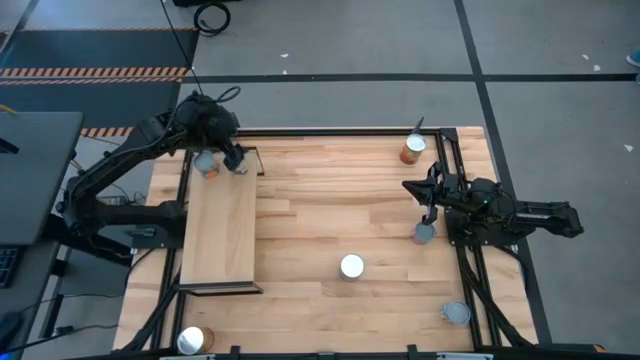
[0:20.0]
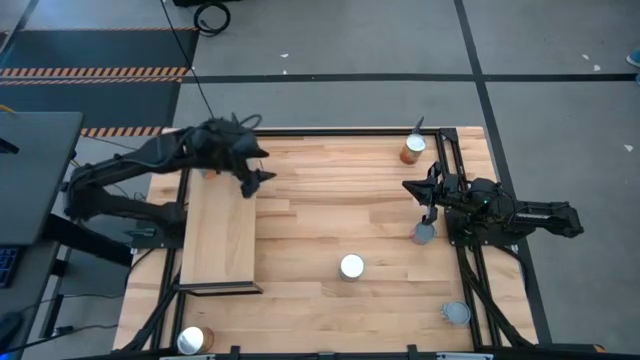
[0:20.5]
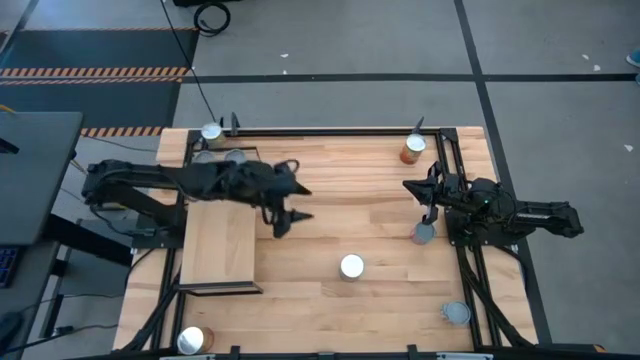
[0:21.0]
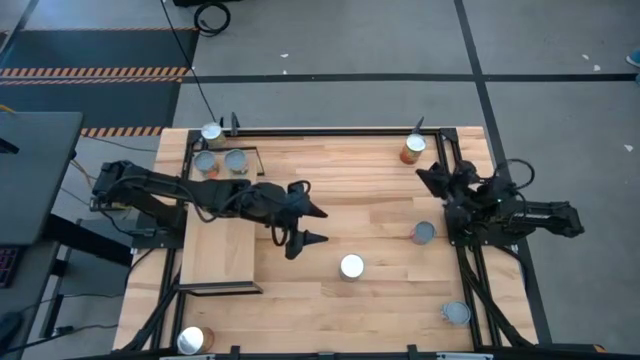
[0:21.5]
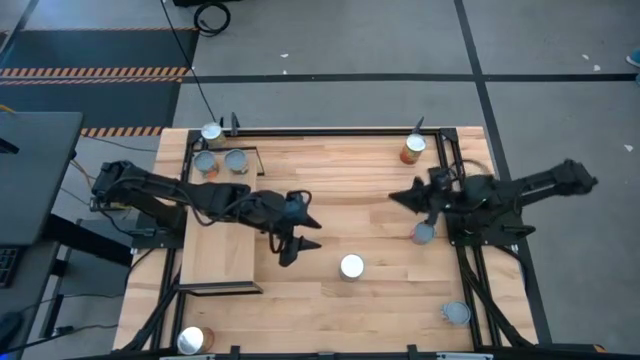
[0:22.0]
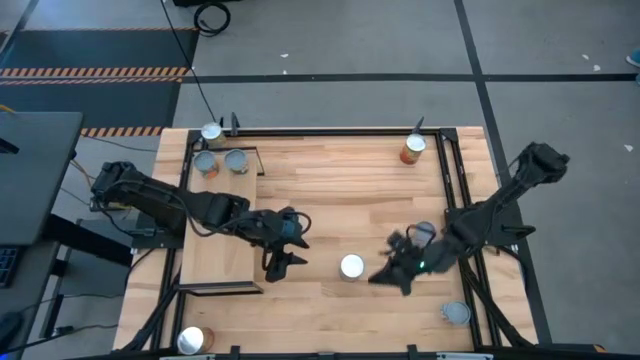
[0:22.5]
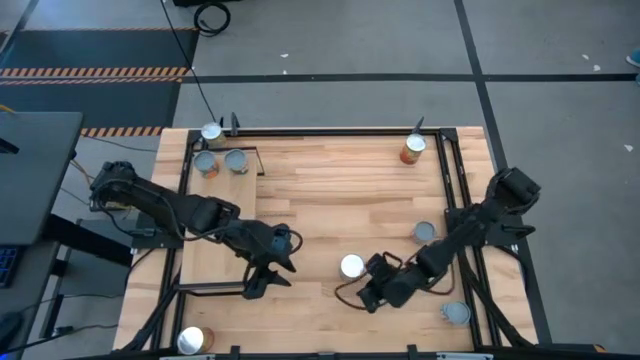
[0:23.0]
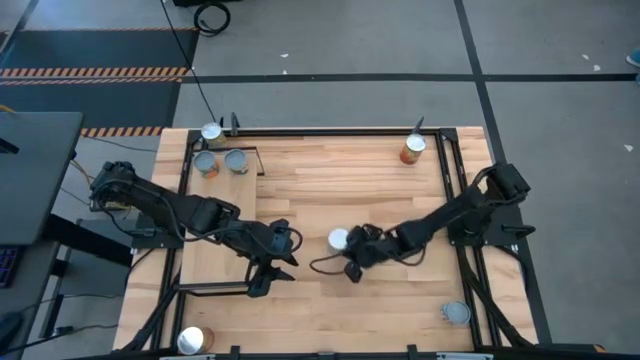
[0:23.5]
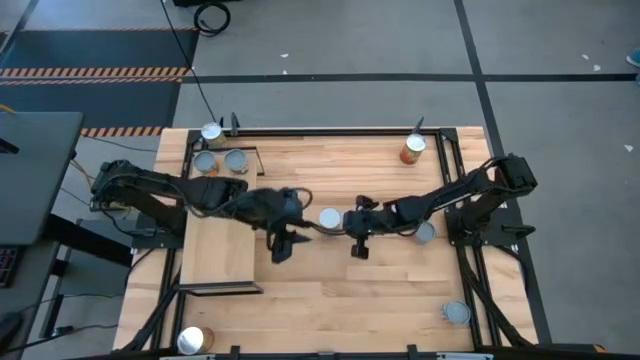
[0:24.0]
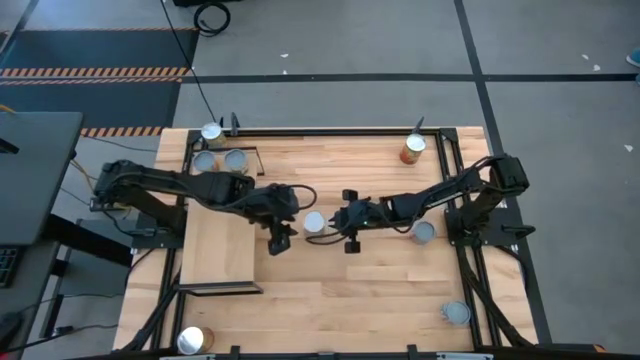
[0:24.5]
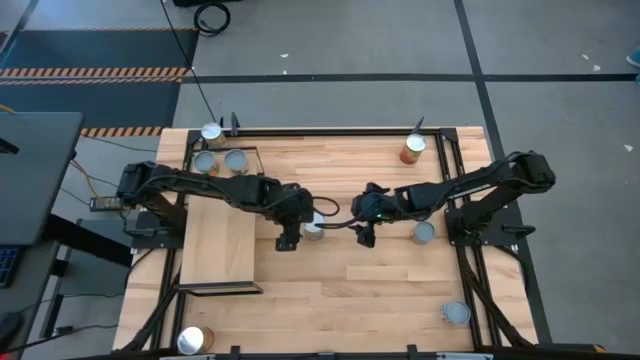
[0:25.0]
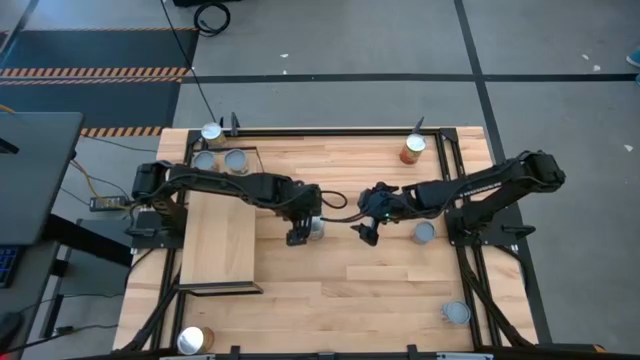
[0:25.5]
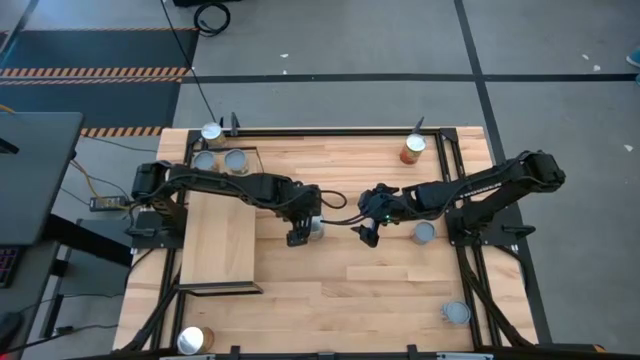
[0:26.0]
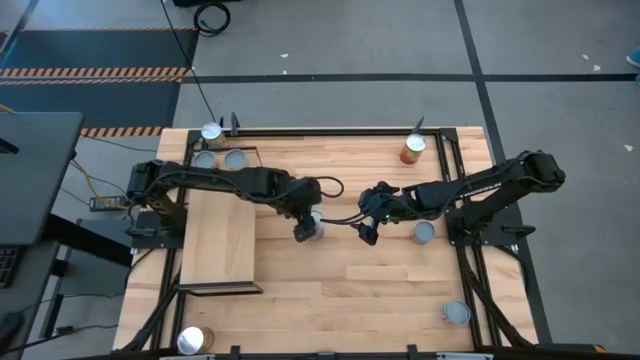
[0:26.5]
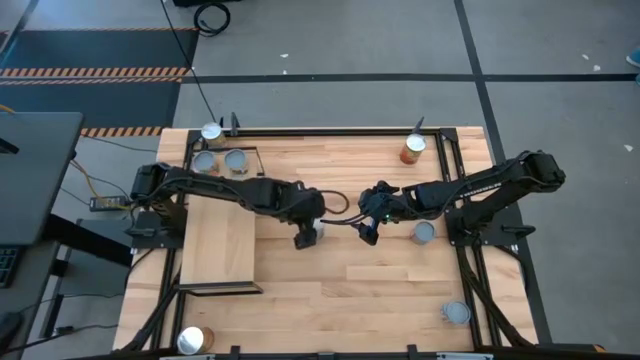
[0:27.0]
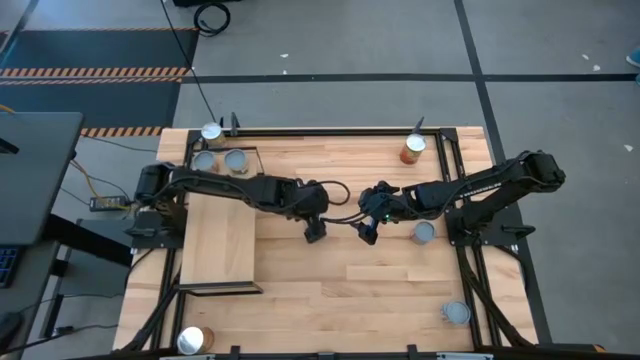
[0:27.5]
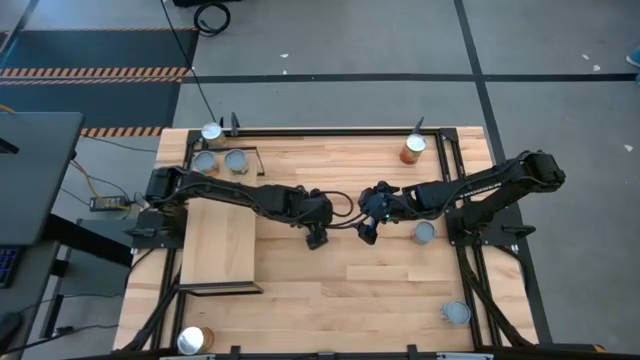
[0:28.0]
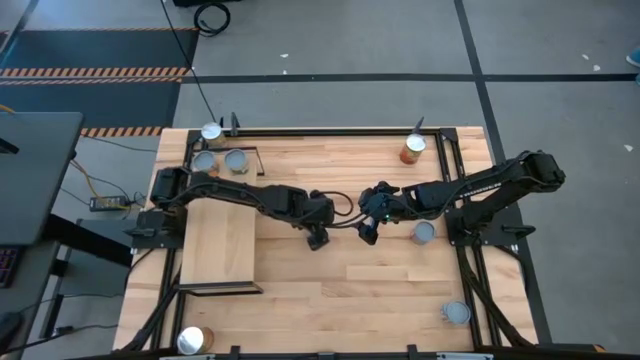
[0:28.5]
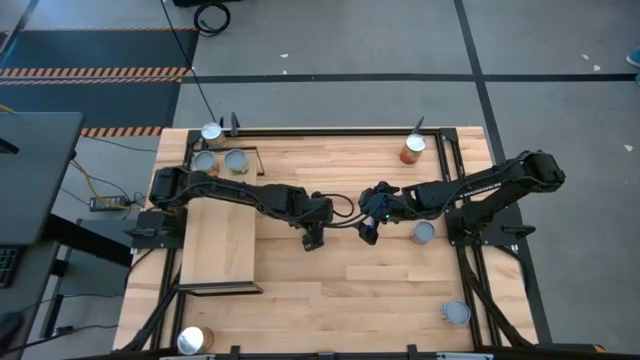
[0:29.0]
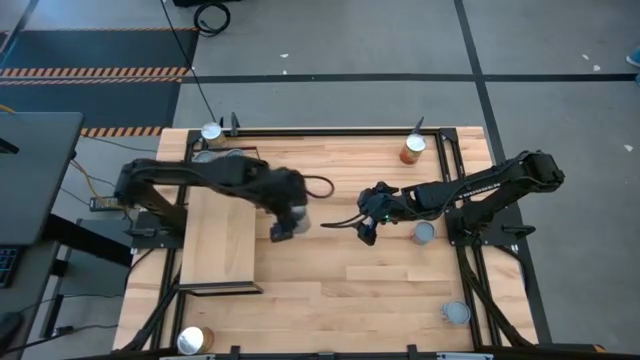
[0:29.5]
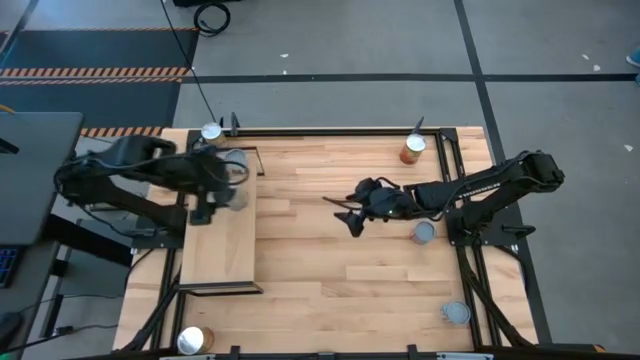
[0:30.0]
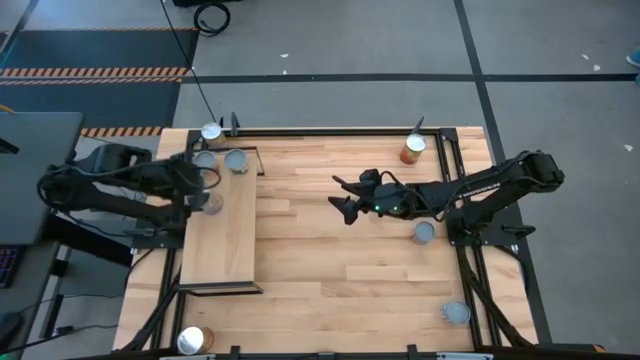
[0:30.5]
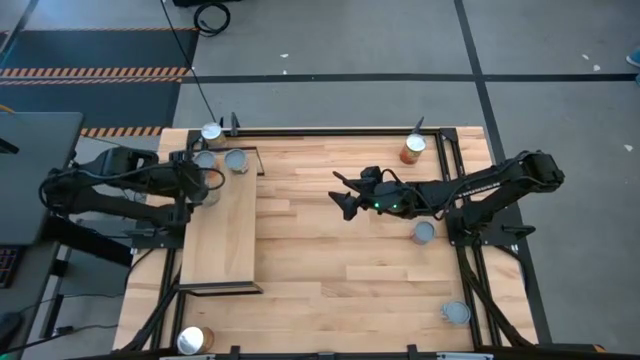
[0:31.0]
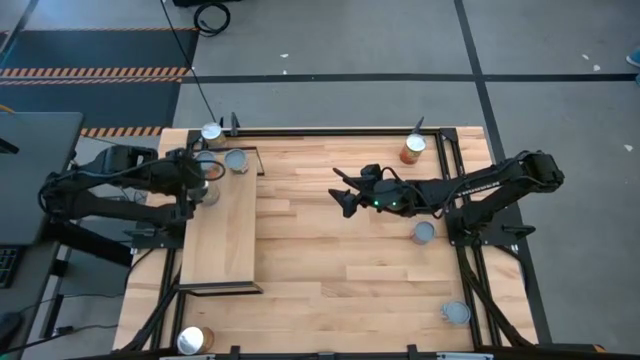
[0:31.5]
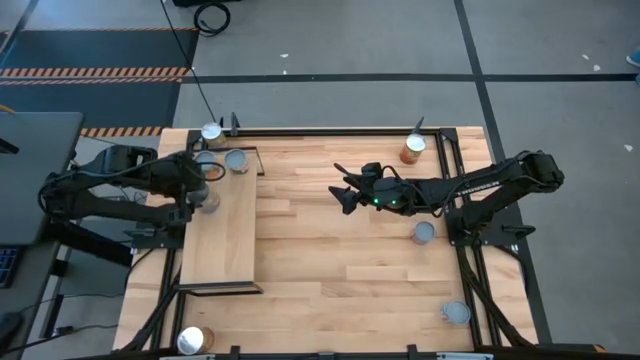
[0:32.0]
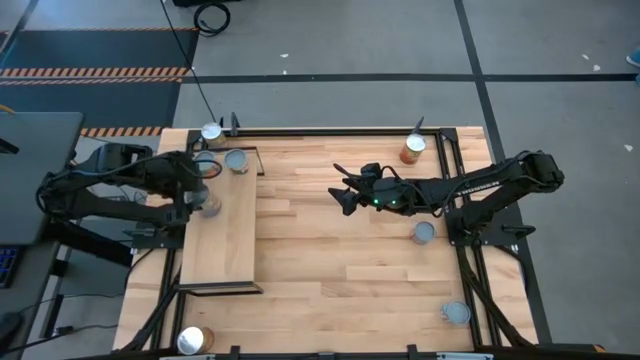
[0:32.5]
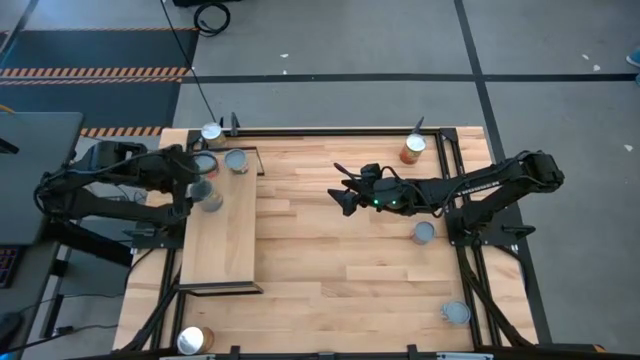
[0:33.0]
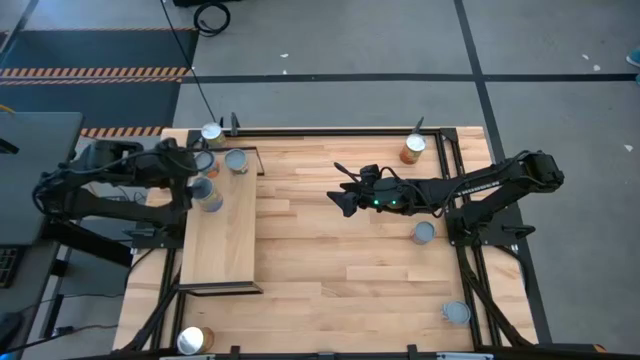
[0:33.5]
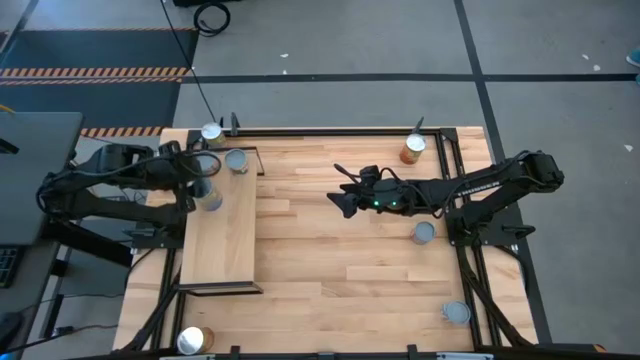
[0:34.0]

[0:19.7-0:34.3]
Task: Pick and place cans onto a shelf
Put the bottom canned peaches on the shelf

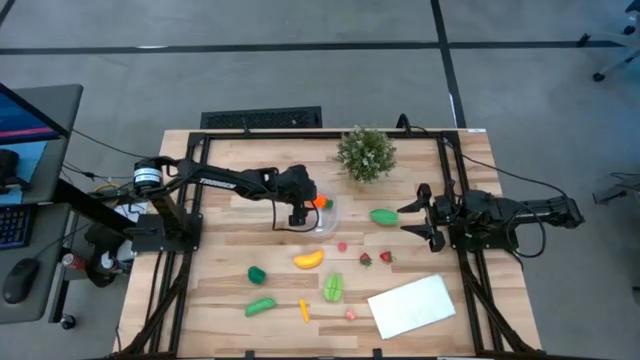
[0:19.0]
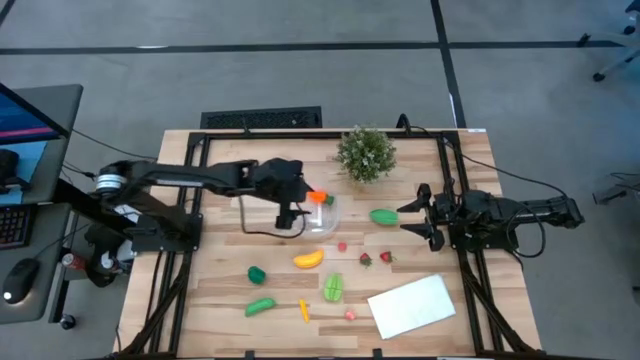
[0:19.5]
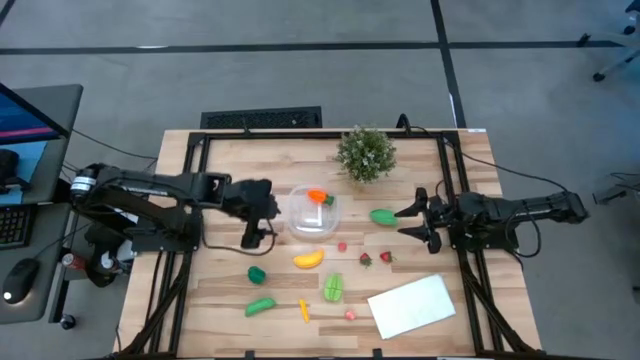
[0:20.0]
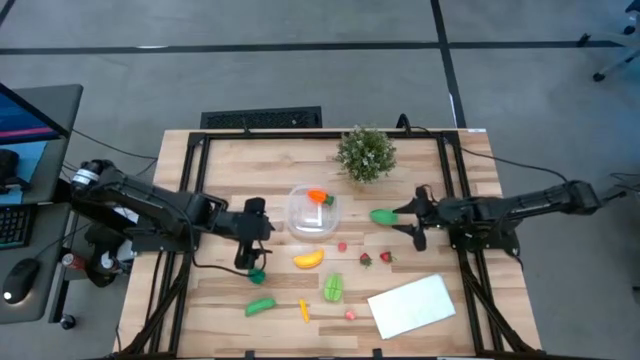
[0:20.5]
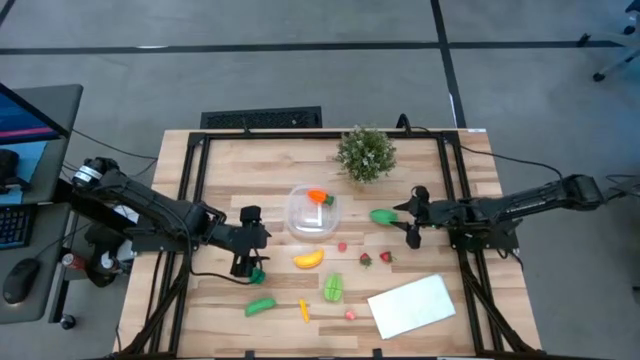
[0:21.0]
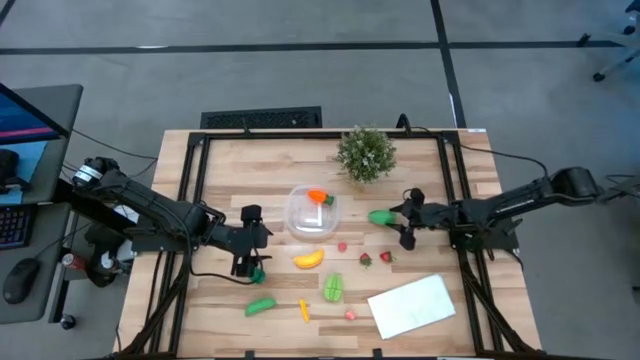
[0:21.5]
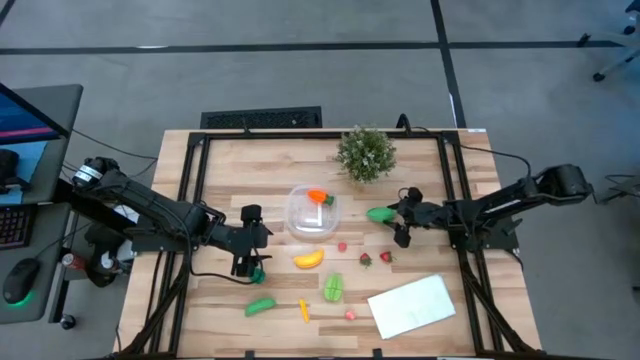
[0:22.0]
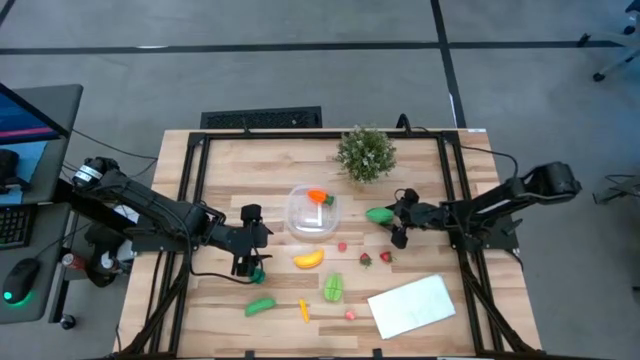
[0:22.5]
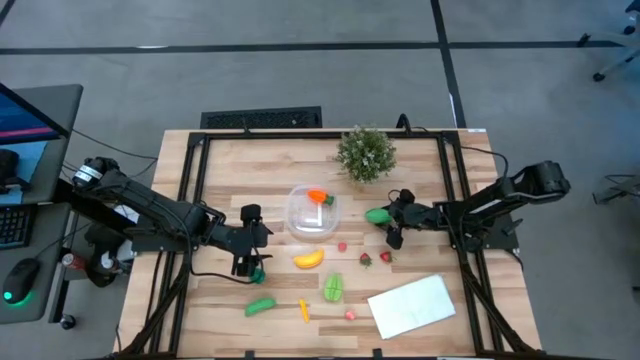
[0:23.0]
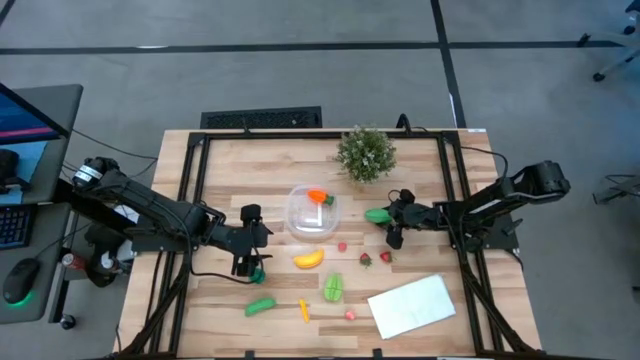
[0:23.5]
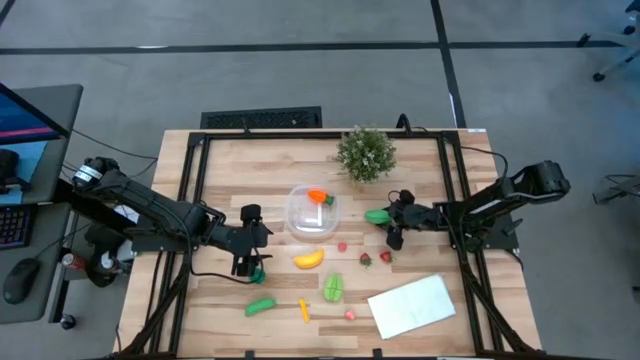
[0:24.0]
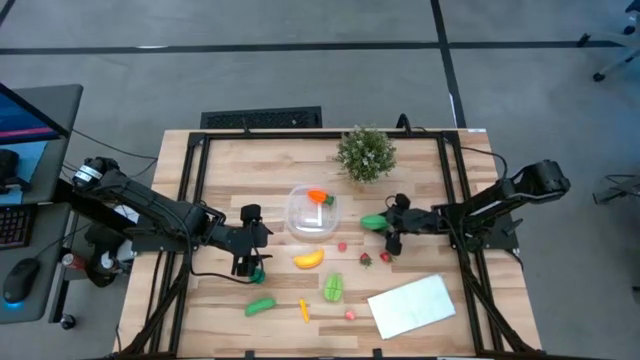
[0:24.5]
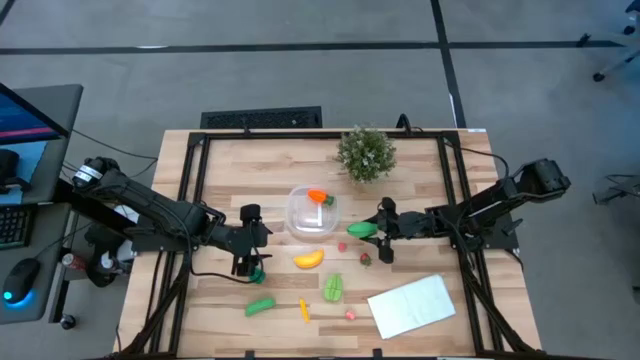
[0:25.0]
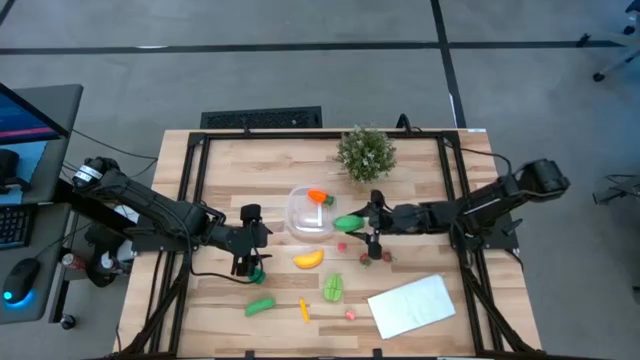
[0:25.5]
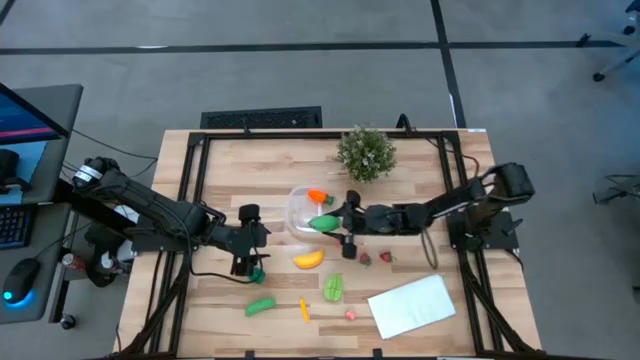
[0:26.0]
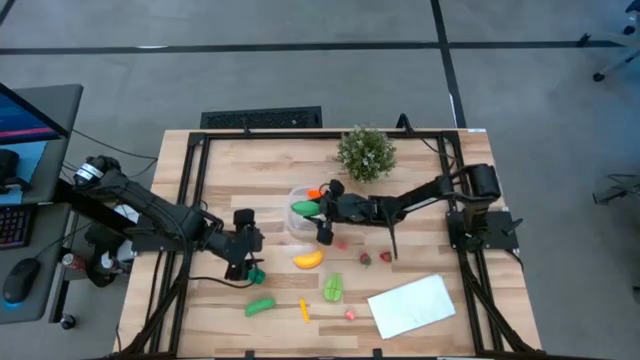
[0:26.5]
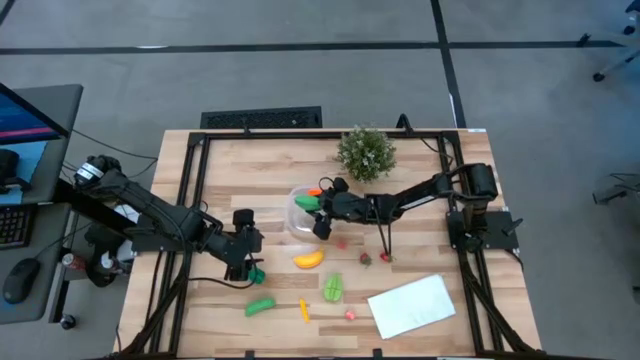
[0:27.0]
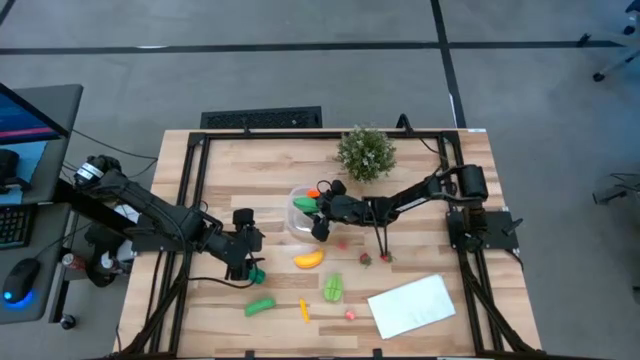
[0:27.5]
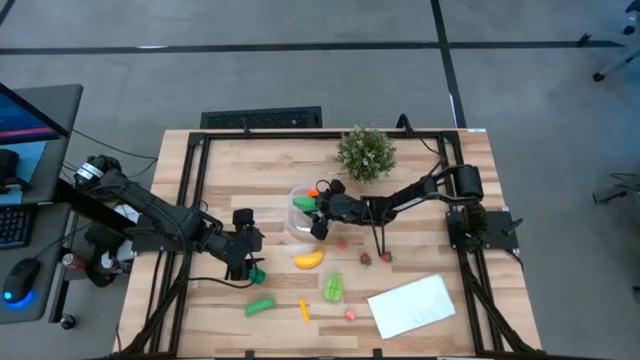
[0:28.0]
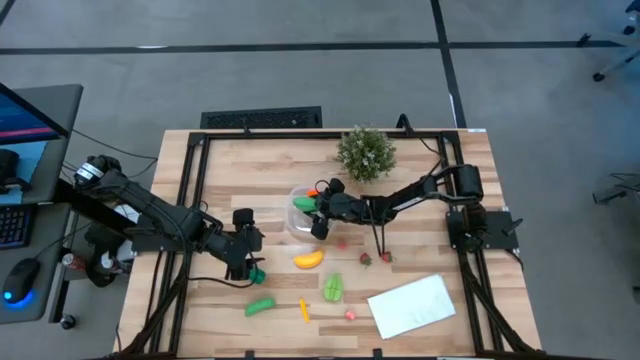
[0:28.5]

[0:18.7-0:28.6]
Task: Pick and placing Produce into tupperware
Put the green corn into the transparent container
